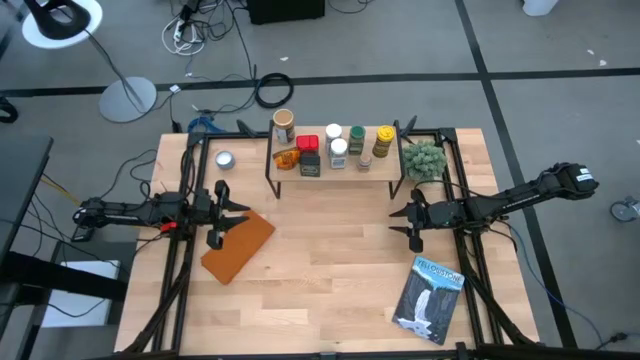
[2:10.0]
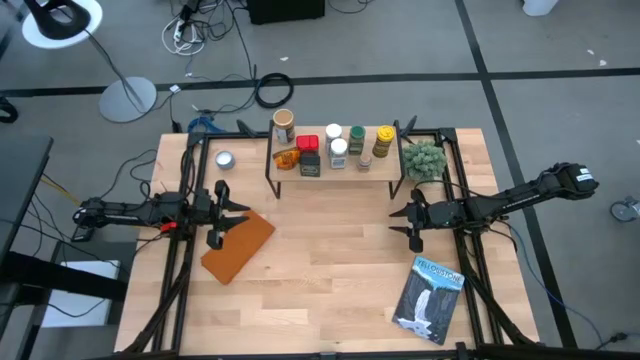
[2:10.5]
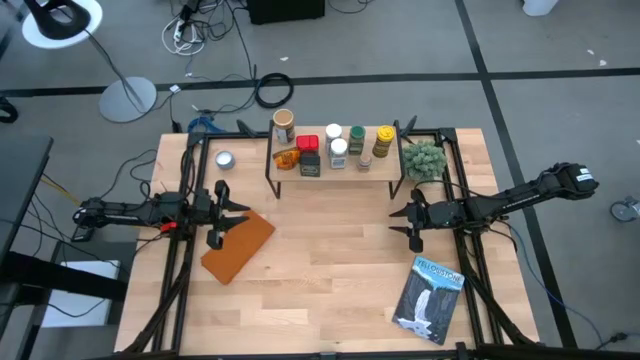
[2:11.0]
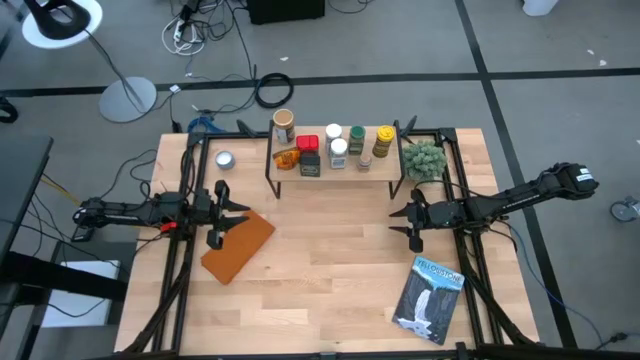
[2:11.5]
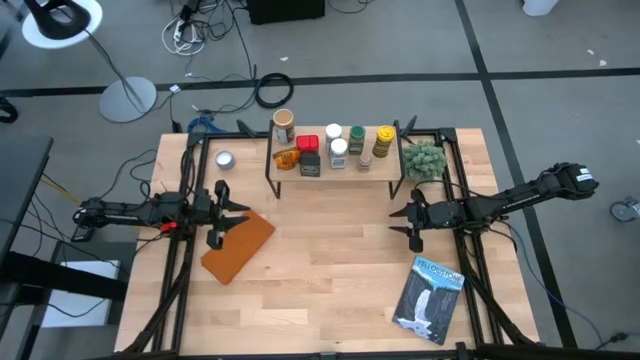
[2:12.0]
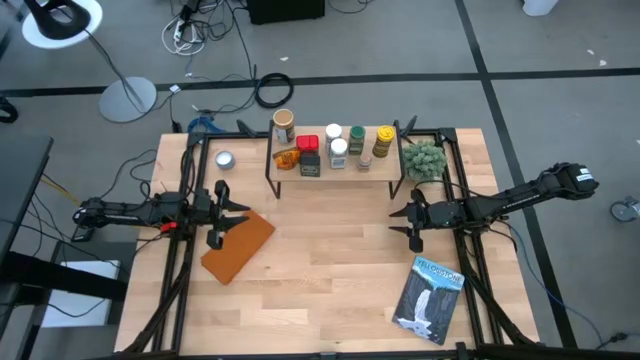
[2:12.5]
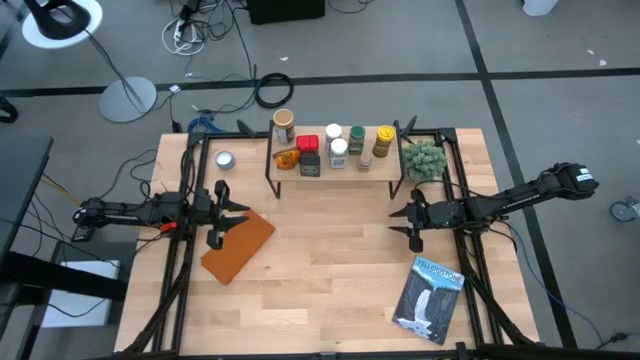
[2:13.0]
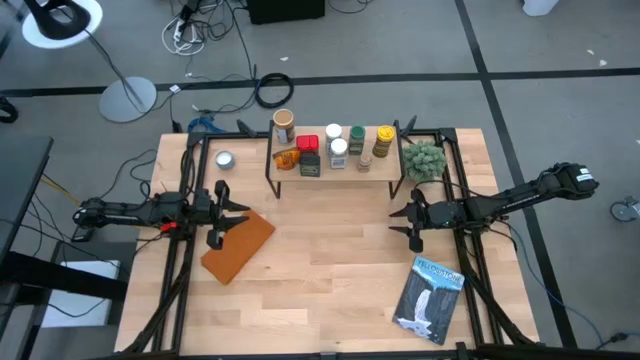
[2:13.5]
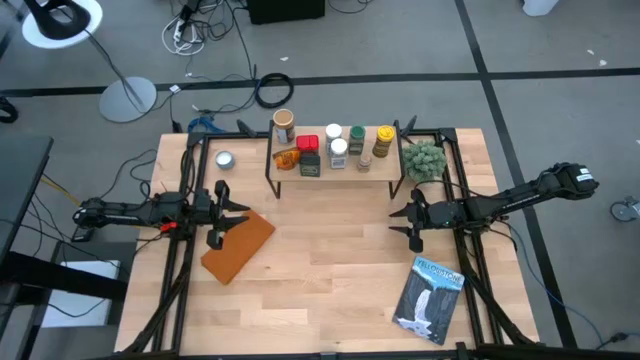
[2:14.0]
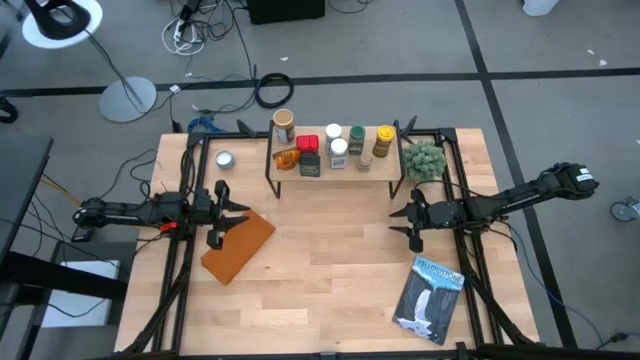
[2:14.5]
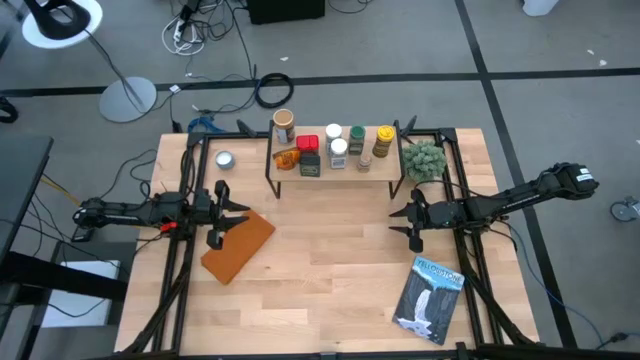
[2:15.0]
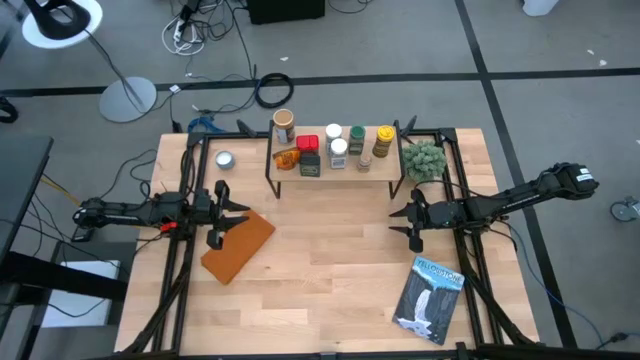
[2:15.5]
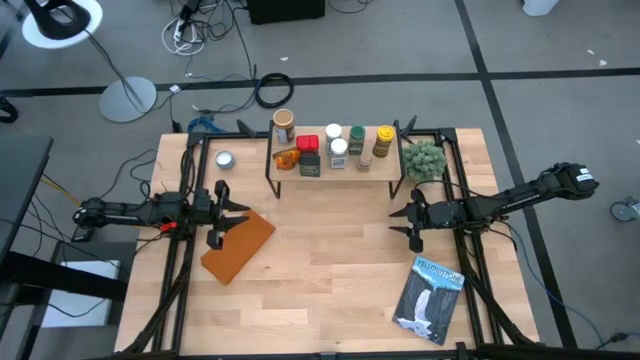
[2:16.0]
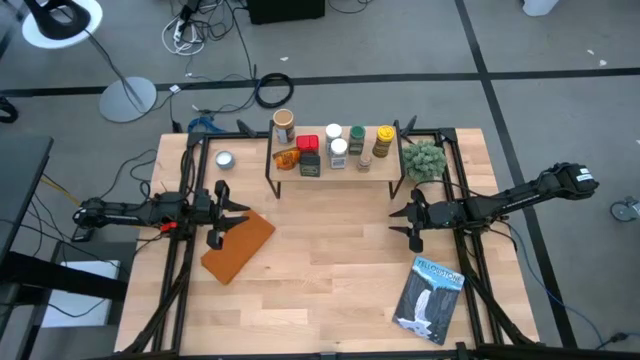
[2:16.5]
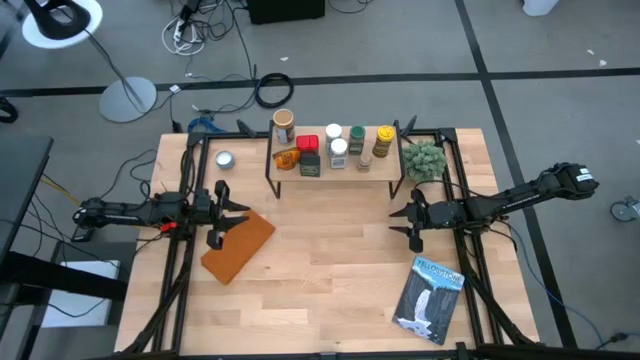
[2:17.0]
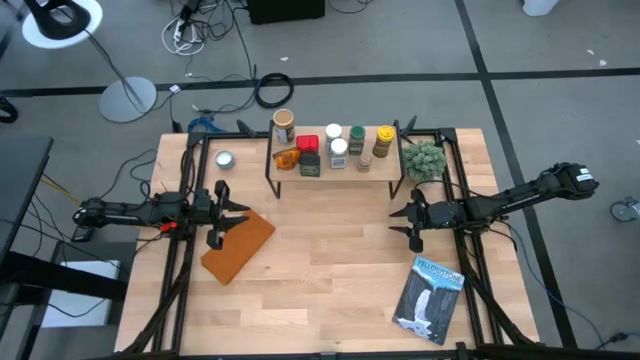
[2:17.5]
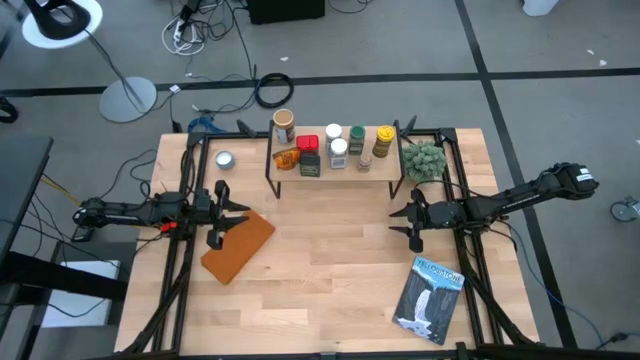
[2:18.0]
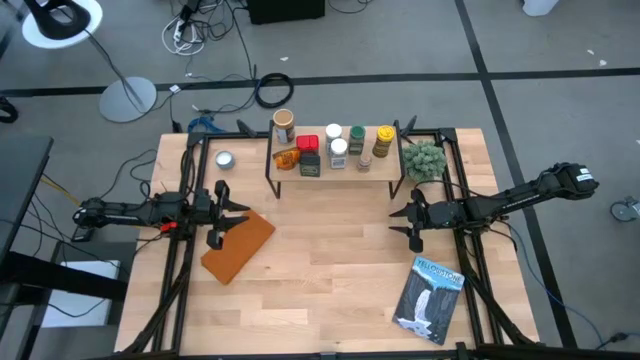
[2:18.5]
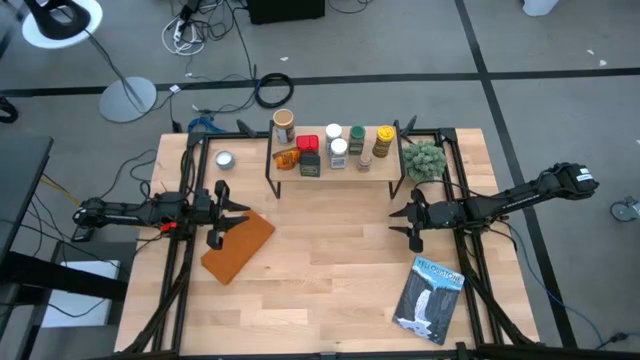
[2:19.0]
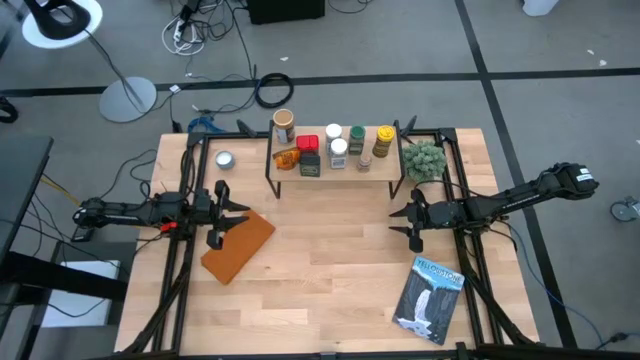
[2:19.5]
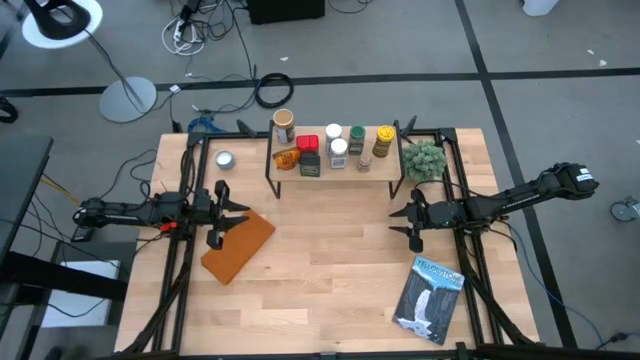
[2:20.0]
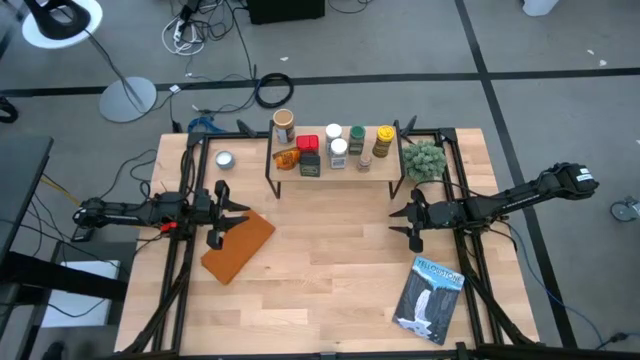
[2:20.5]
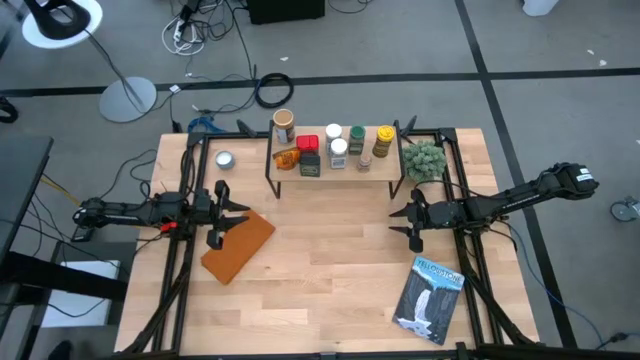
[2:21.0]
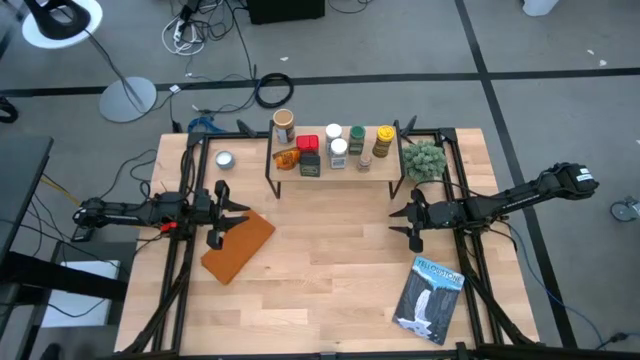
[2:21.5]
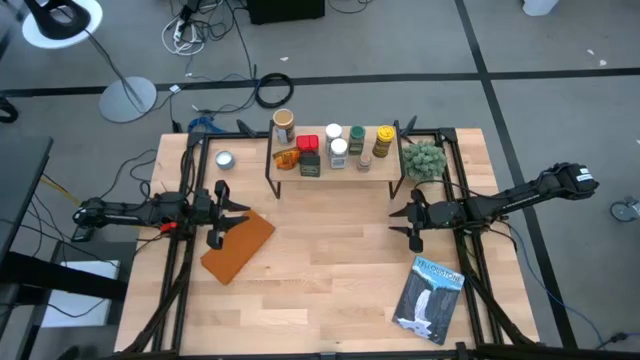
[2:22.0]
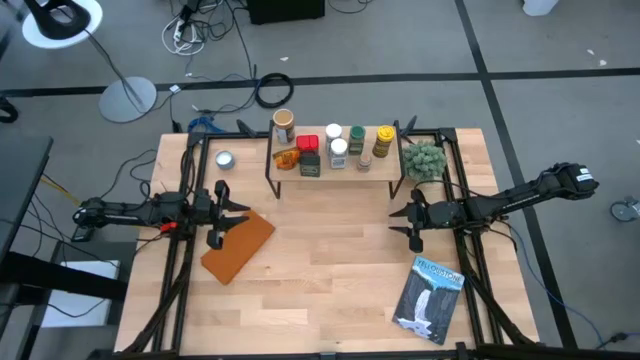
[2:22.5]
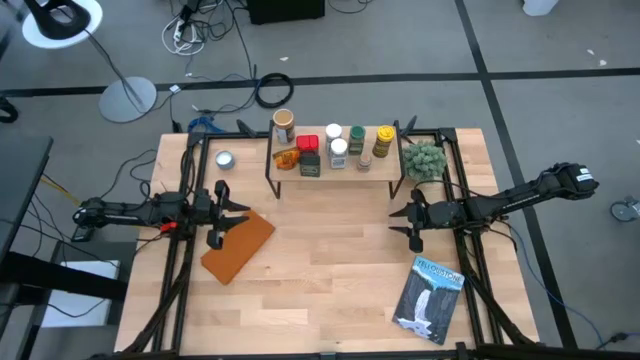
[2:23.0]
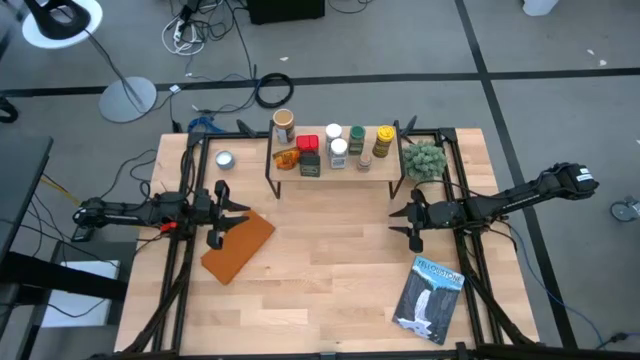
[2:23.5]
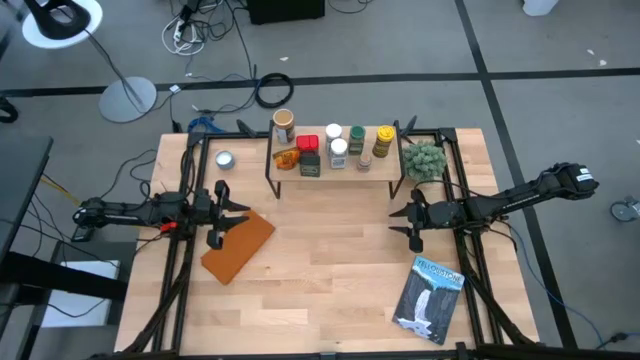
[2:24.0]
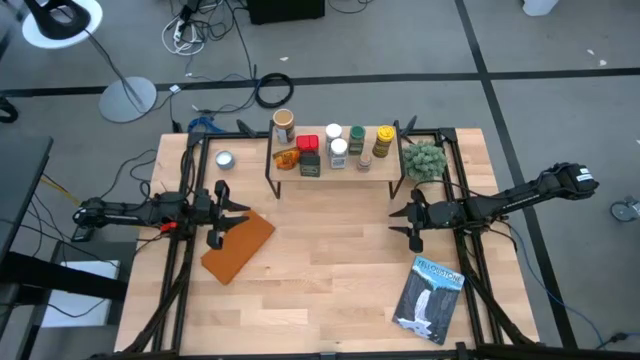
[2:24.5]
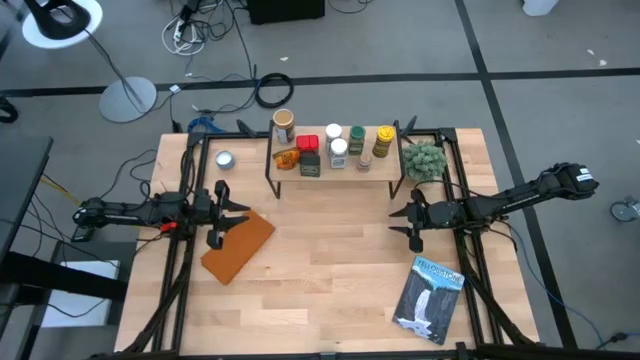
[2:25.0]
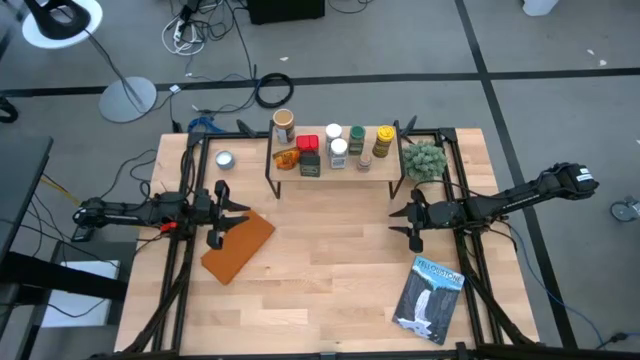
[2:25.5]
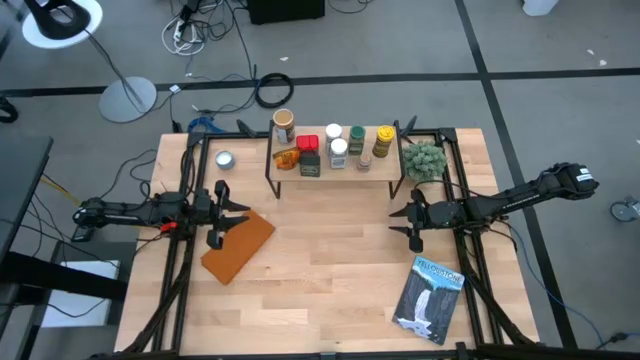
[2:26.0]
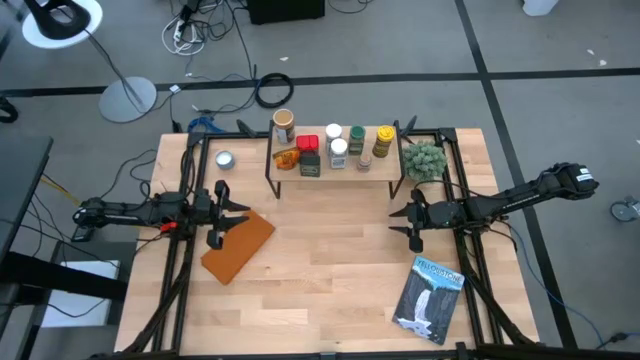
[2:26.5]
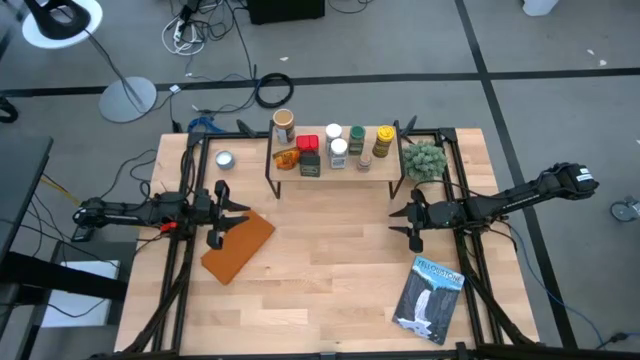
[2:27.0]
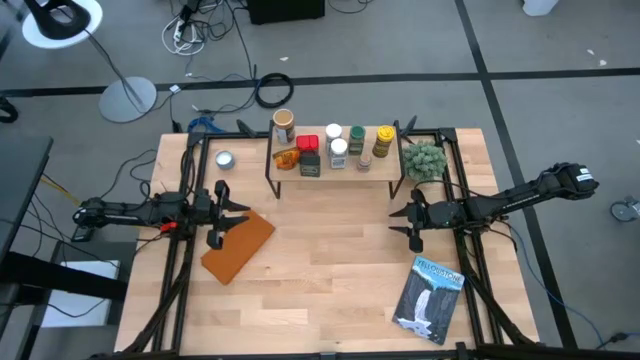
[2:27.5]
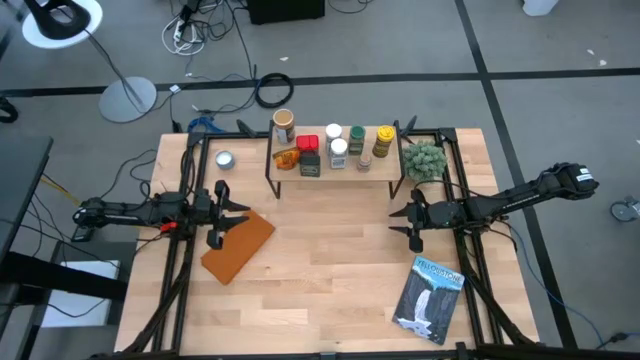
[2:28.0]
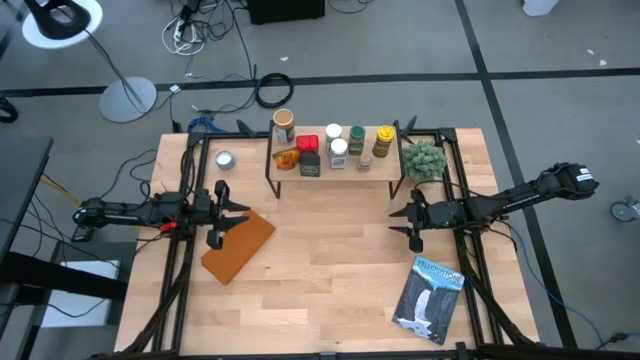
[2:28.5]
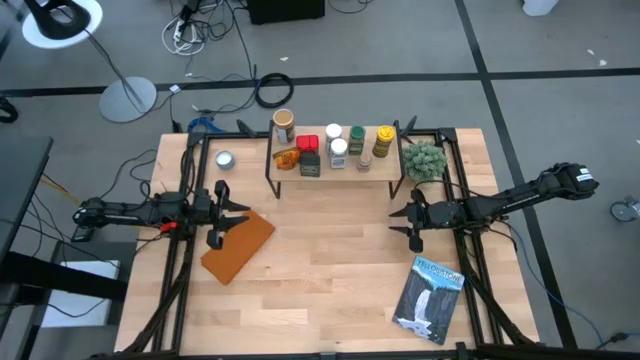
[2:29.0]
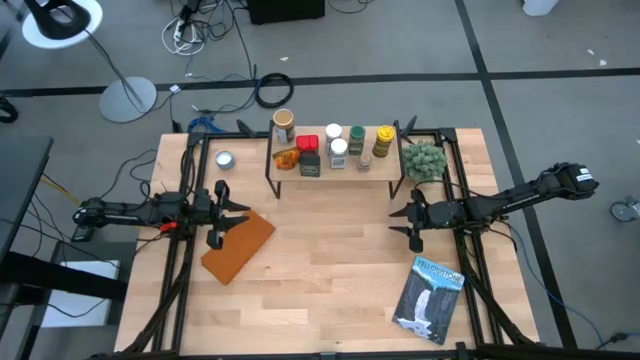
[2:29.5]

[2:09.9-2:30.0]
Task: Shelf spices
Return to Home Position
